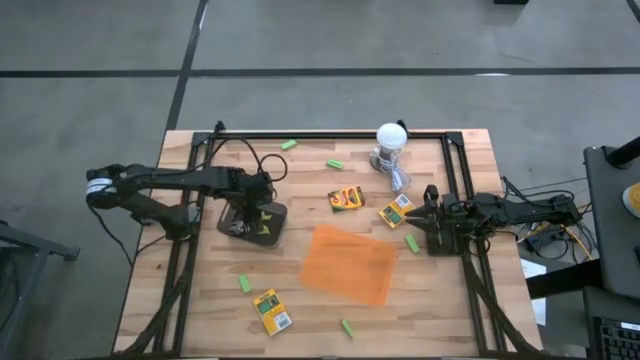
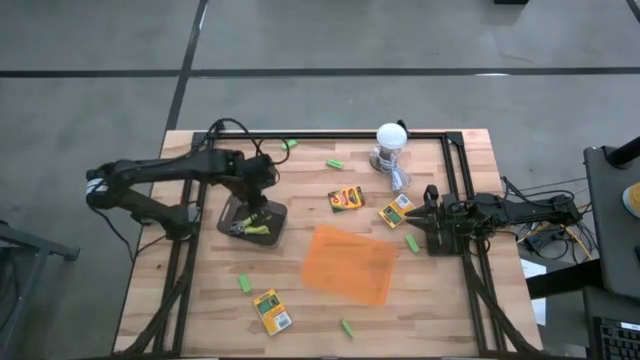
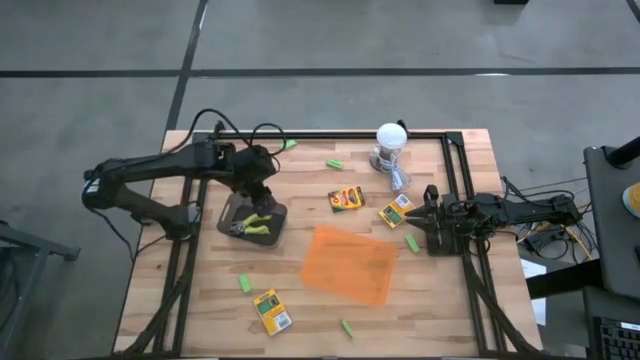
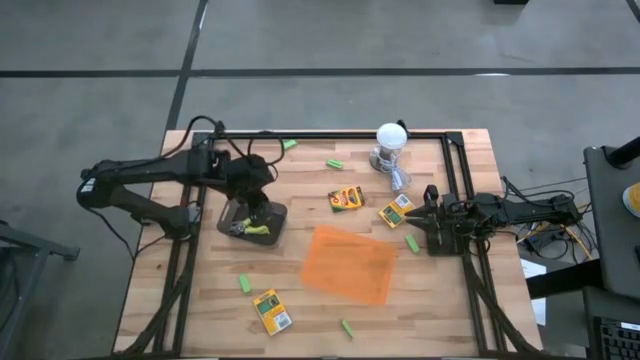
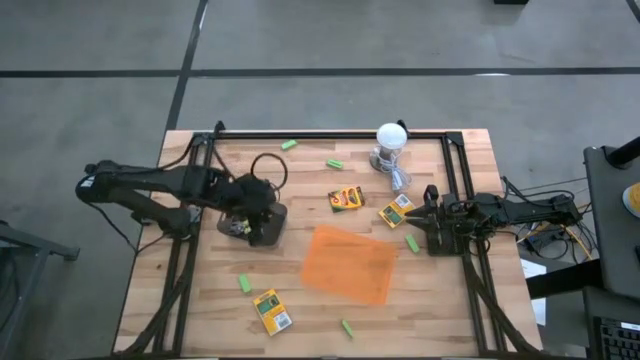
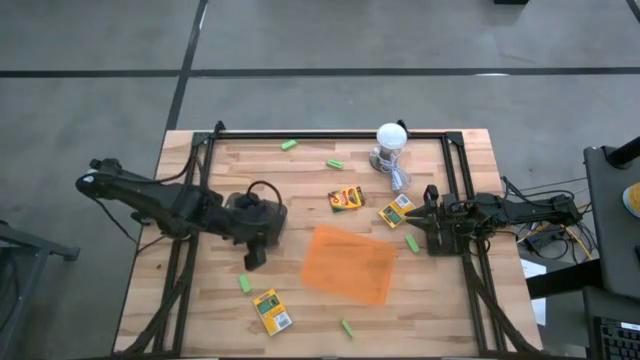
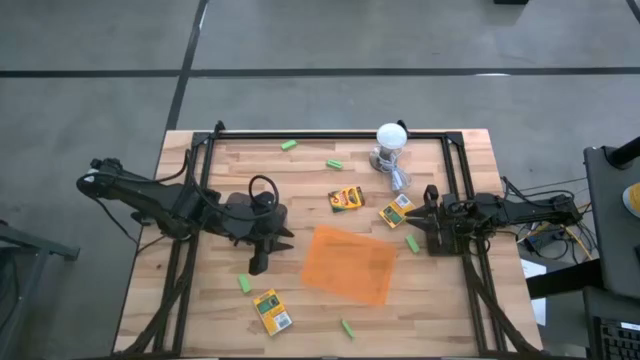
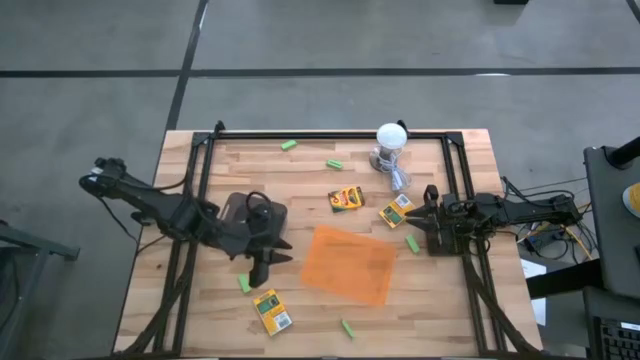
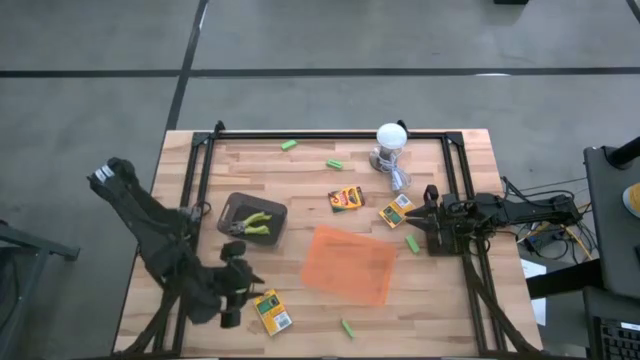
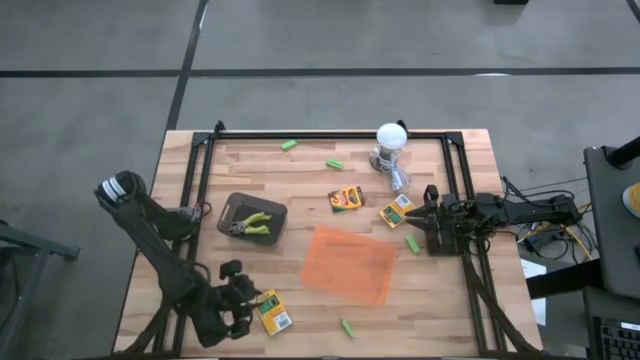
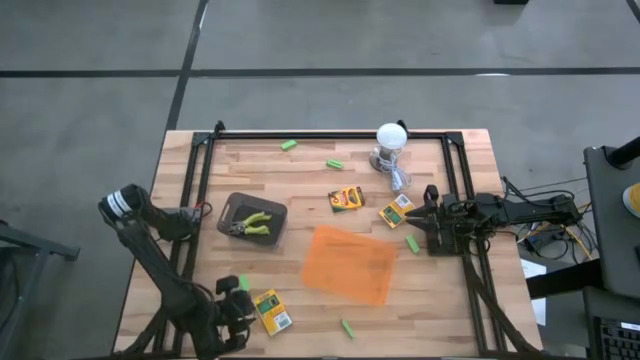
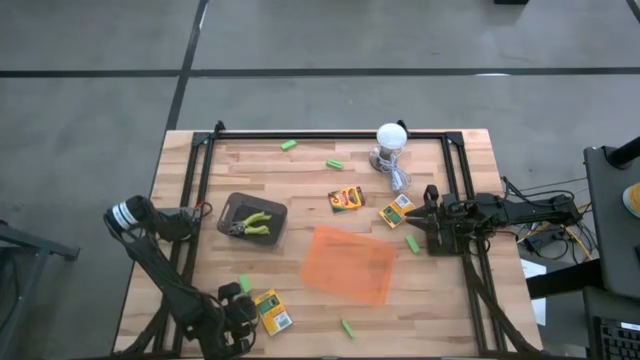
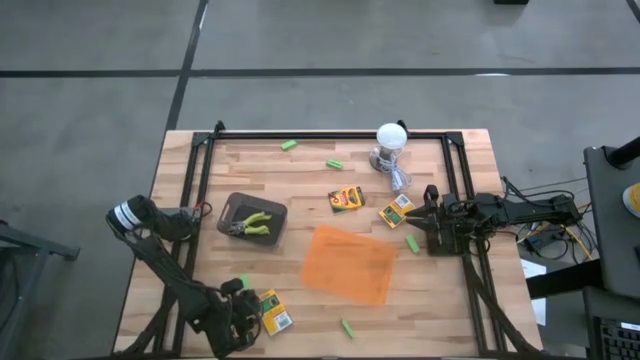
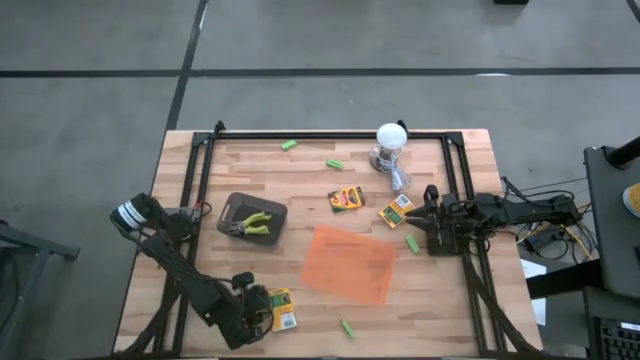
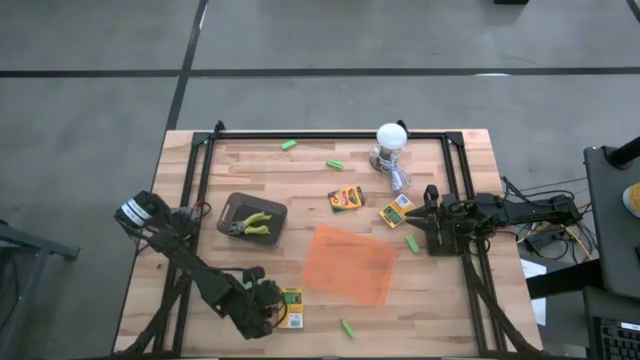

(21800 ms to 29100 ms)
Task: Pick & Place School Supplies
Adjust the bottom crayon box

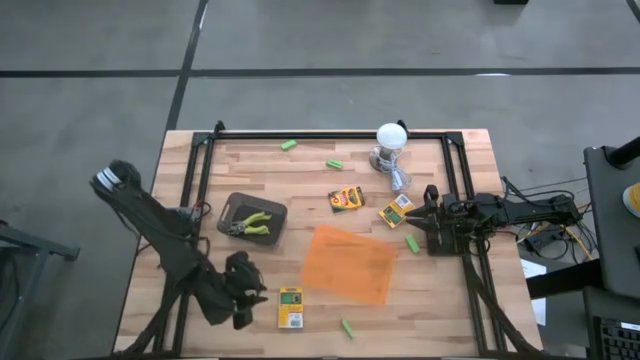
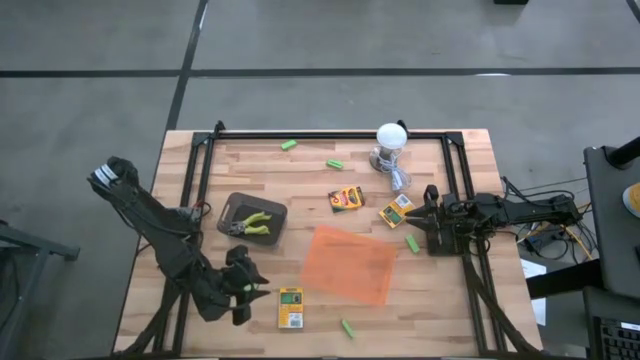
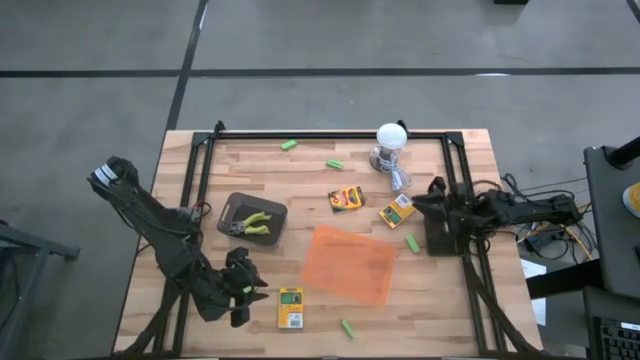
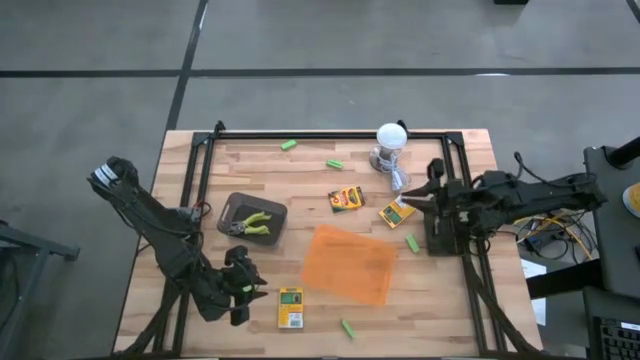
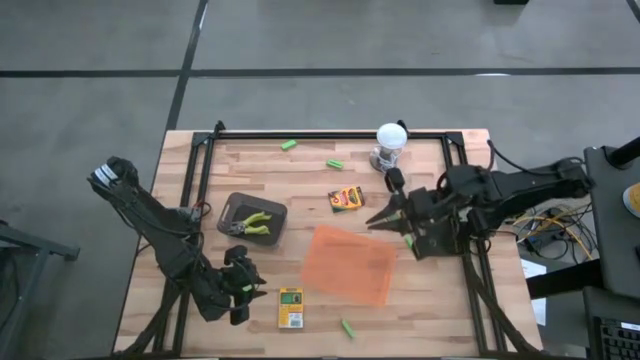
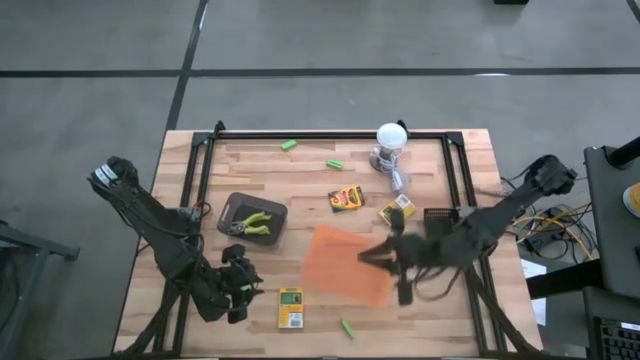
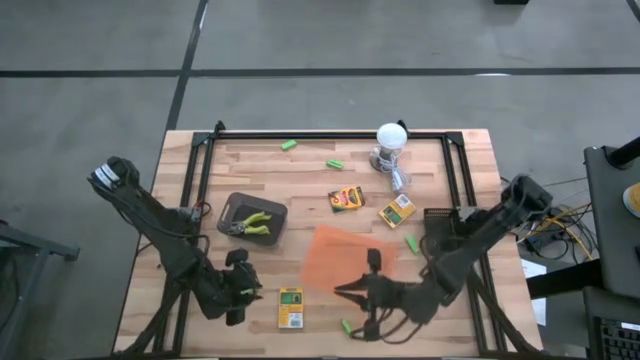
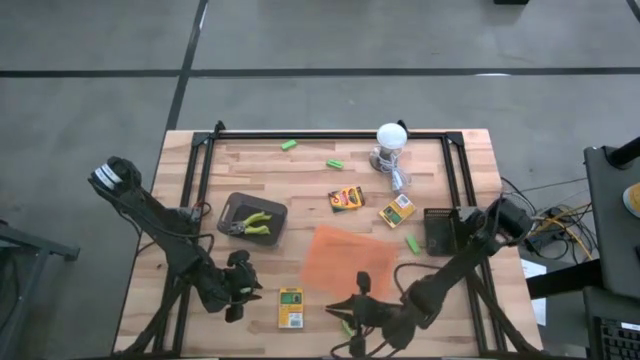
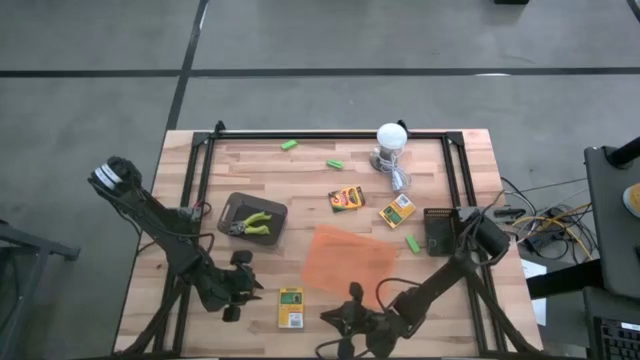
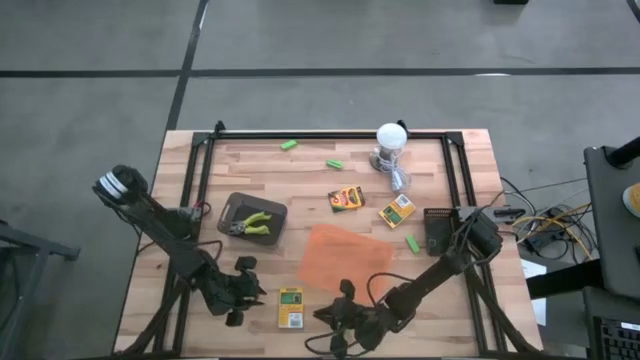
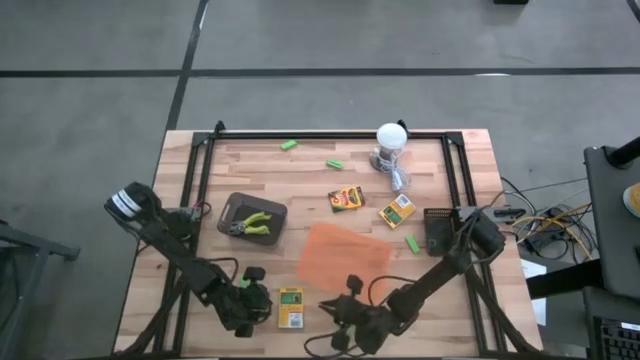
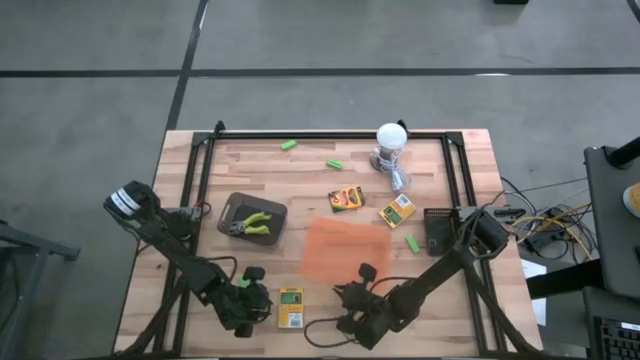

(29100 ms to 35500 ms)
Adjust the orange bin

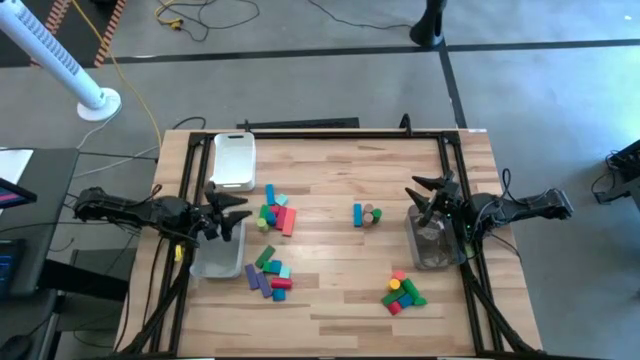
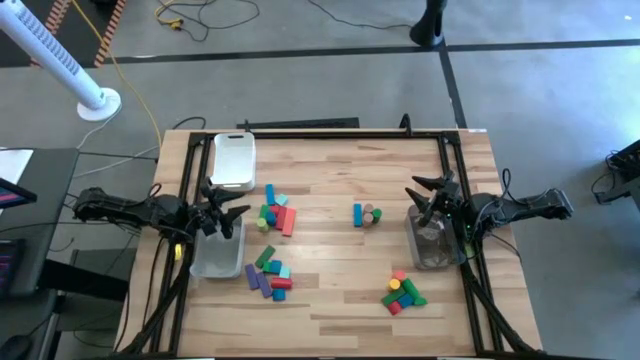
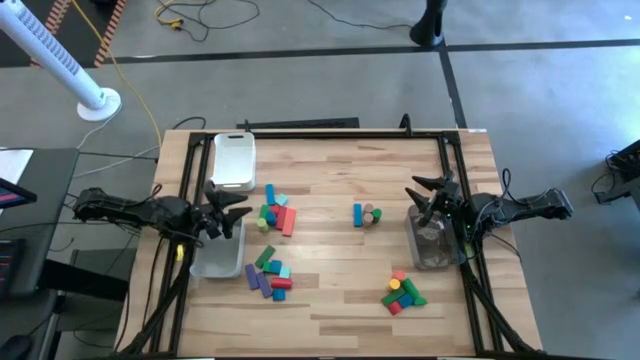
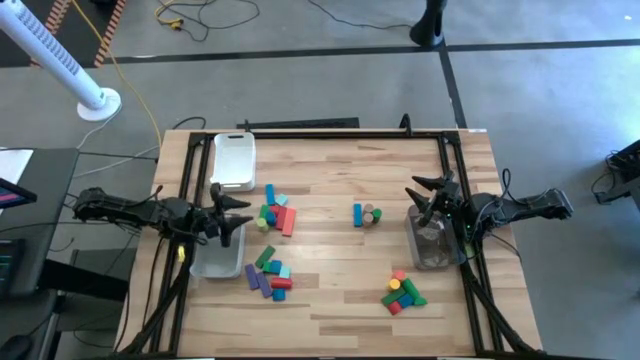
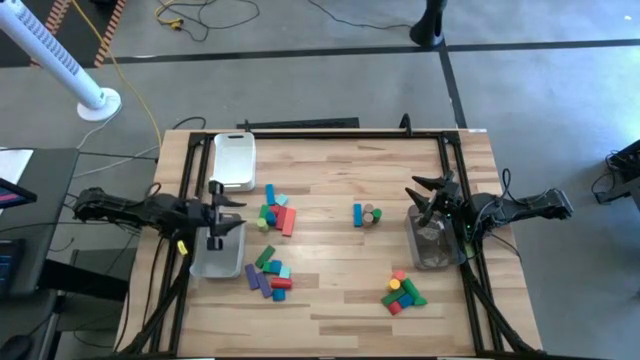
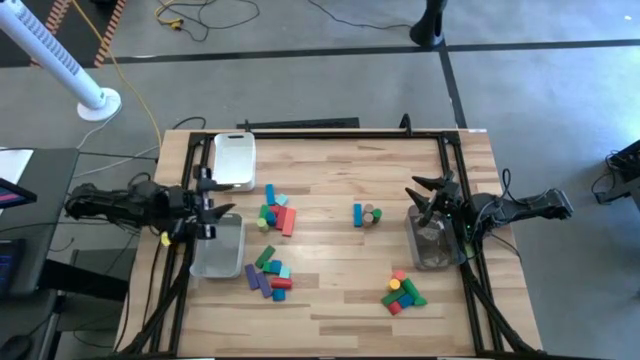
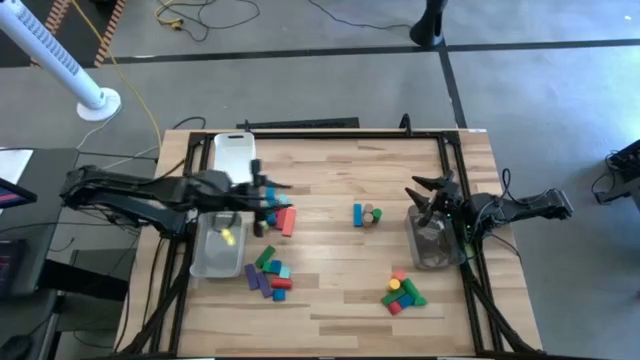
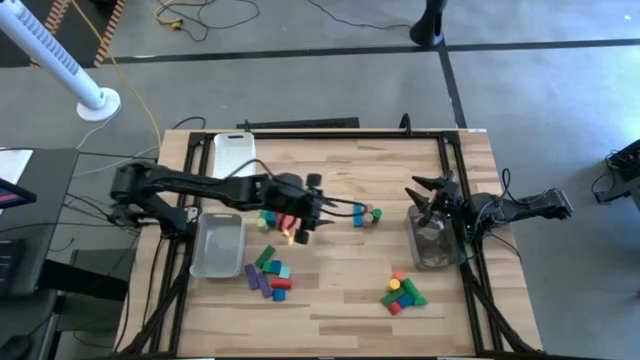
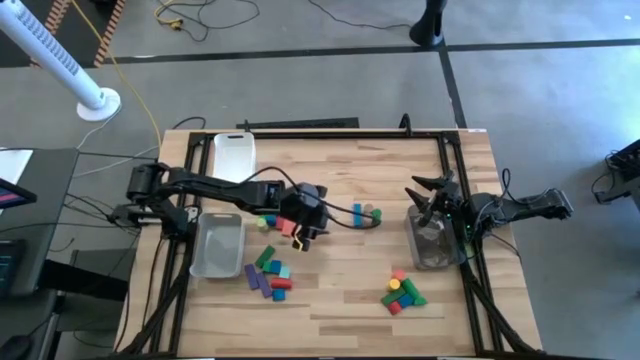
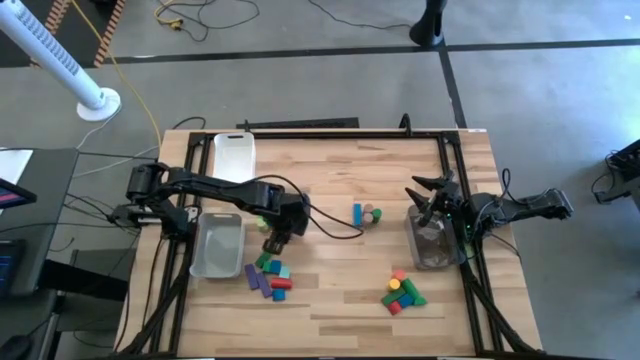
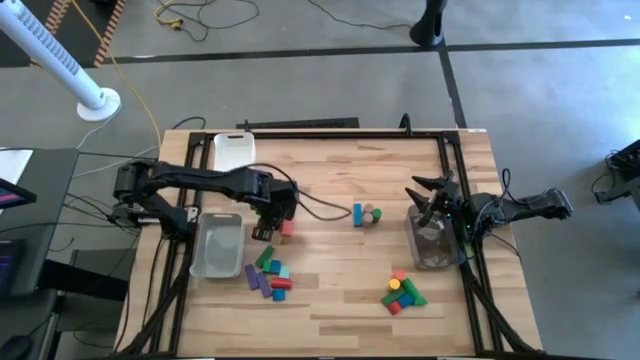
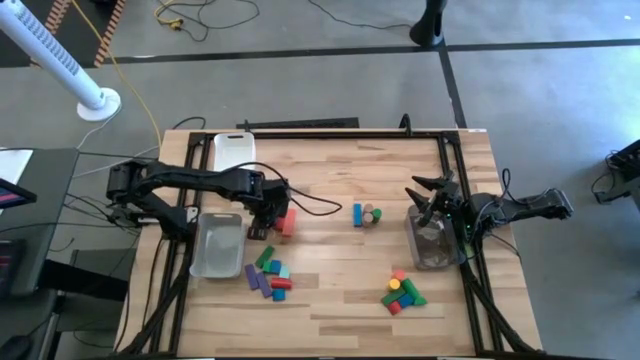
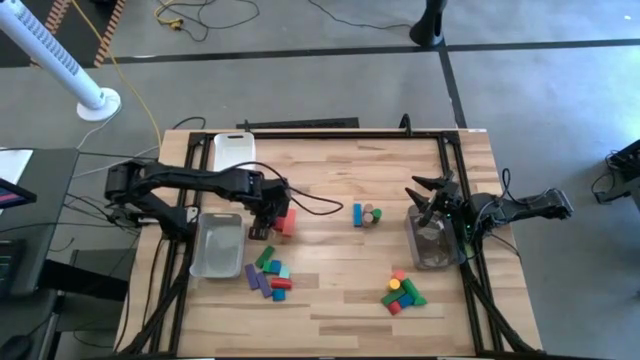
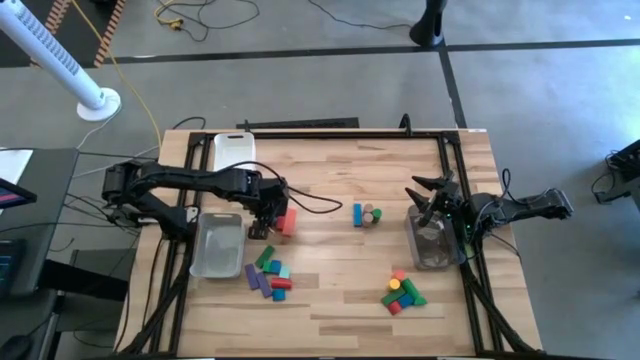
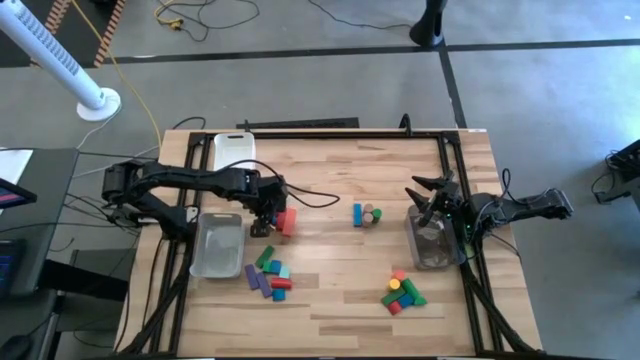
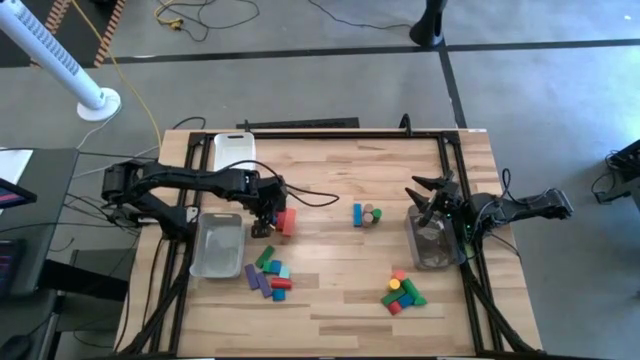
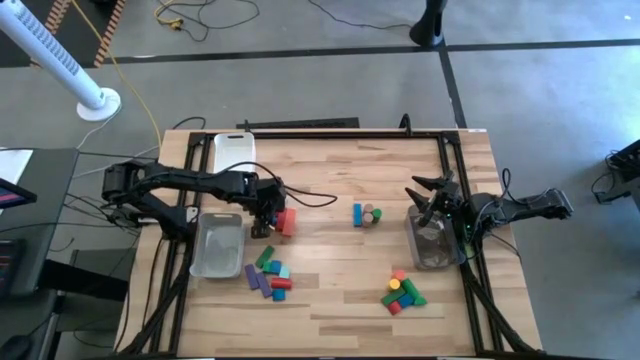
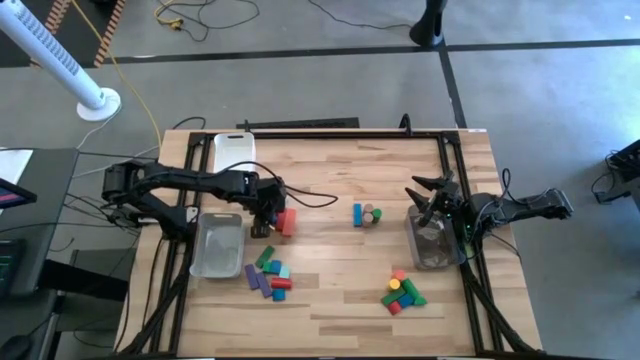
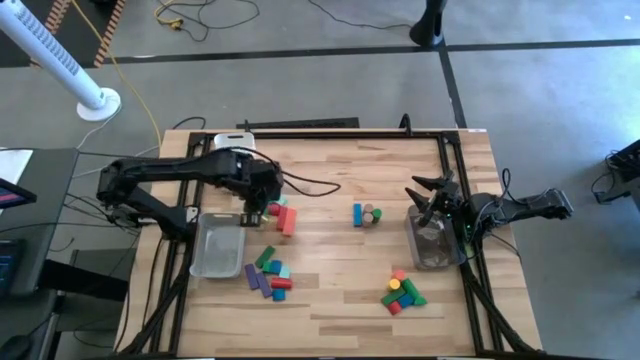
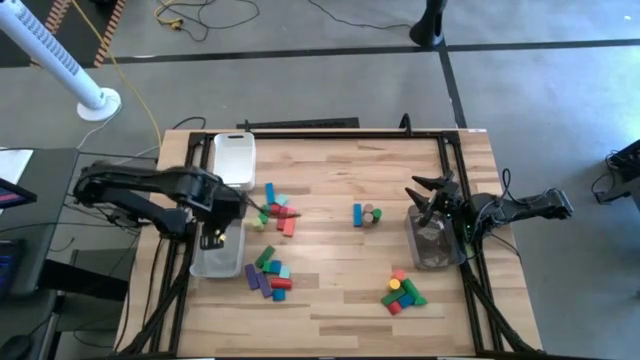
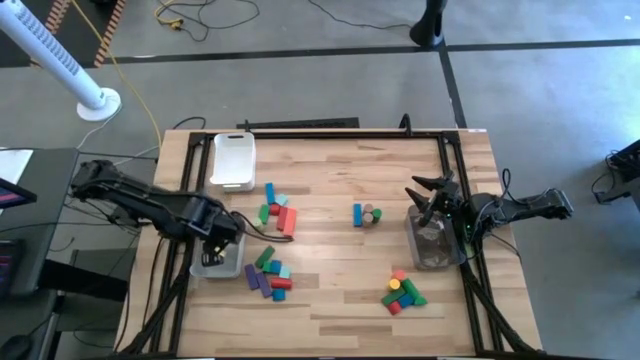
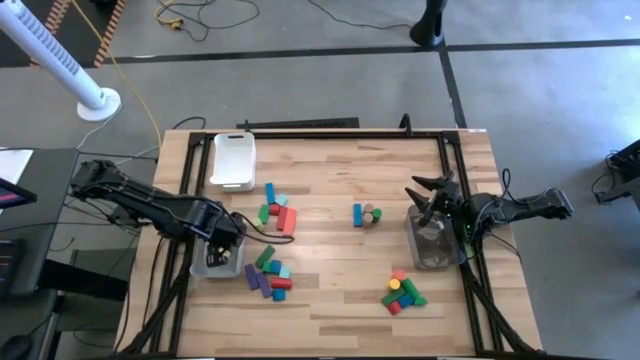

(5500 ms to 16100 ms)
Task: Sort blocks by size
Put the blue cylindrical block into the gray bin
